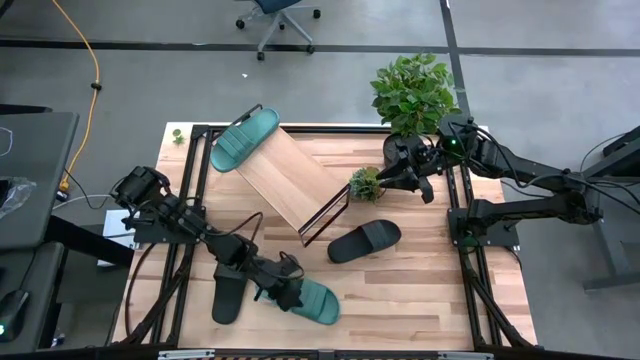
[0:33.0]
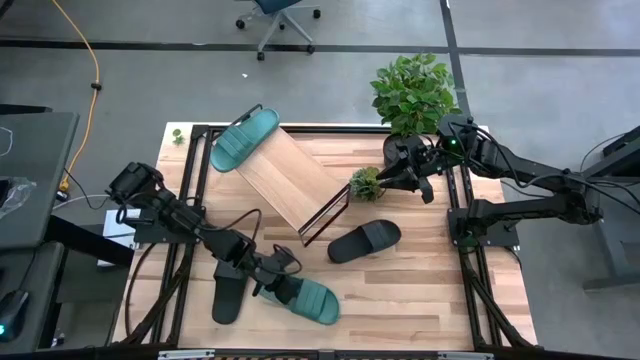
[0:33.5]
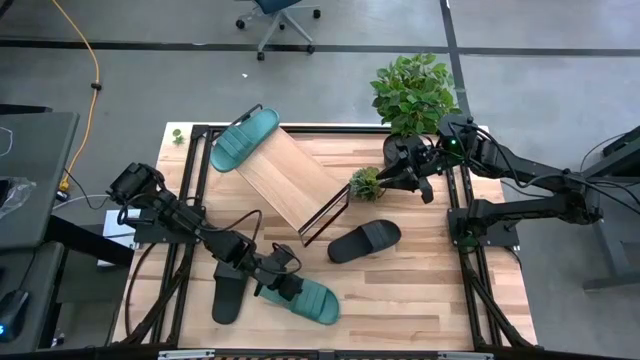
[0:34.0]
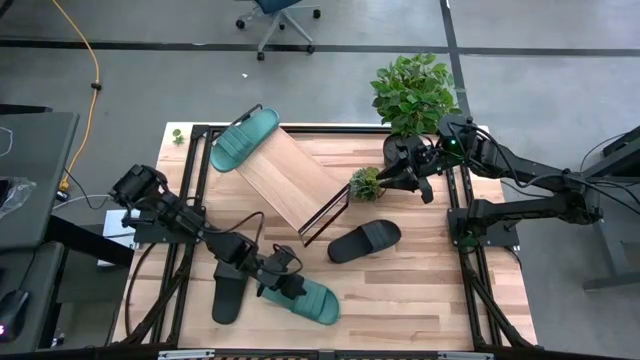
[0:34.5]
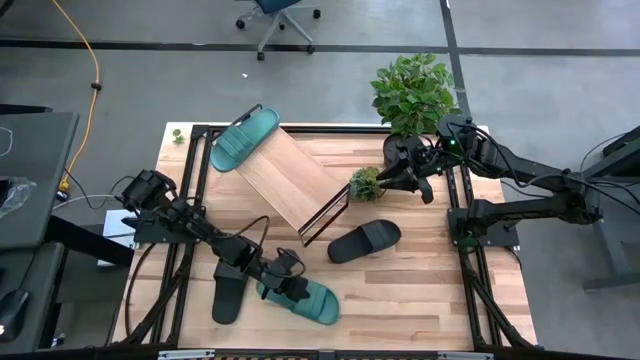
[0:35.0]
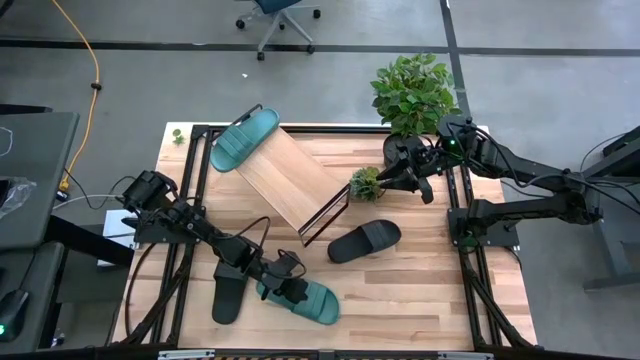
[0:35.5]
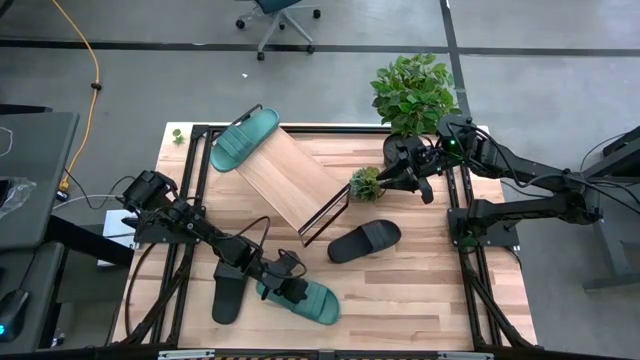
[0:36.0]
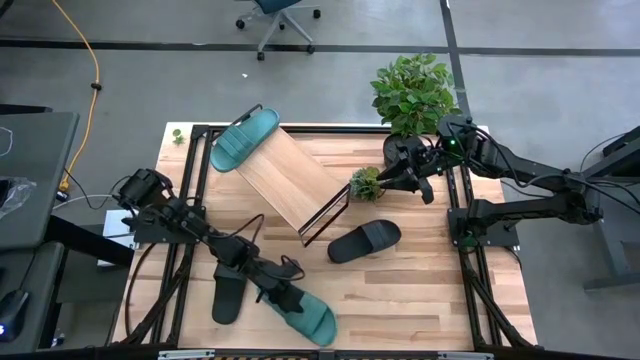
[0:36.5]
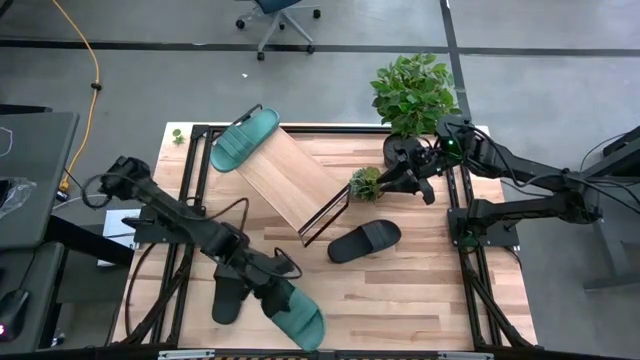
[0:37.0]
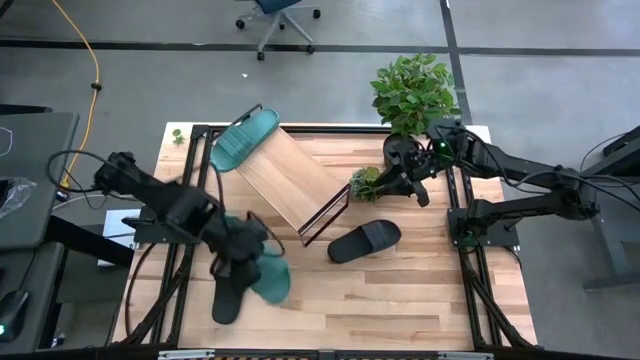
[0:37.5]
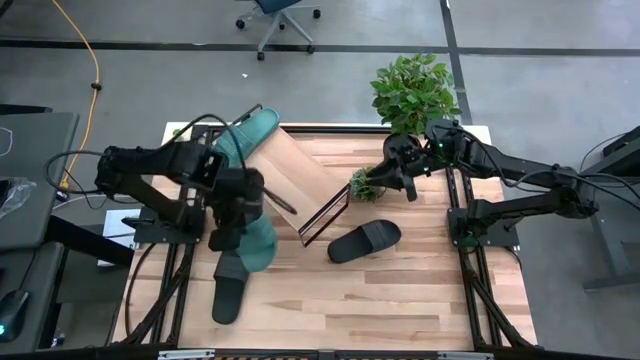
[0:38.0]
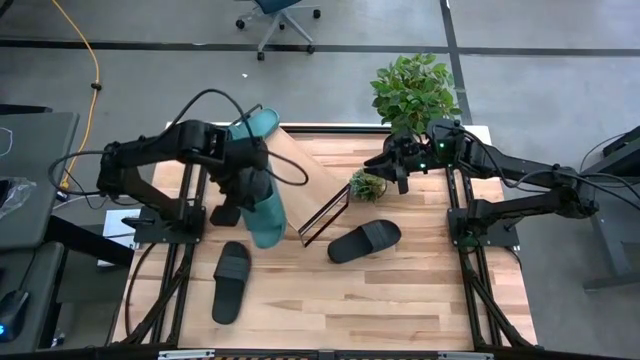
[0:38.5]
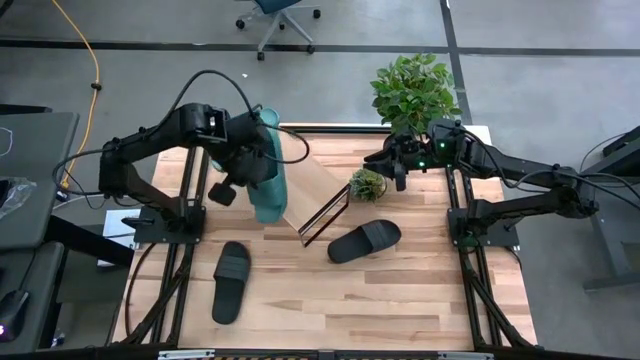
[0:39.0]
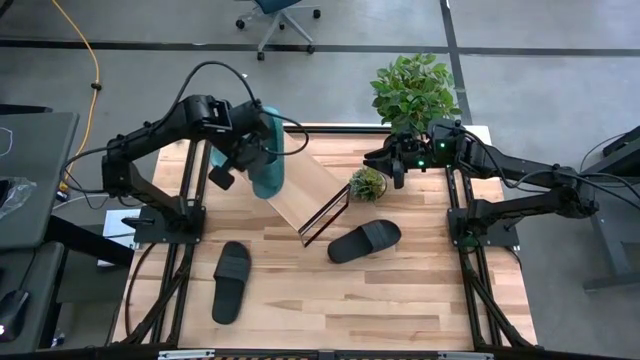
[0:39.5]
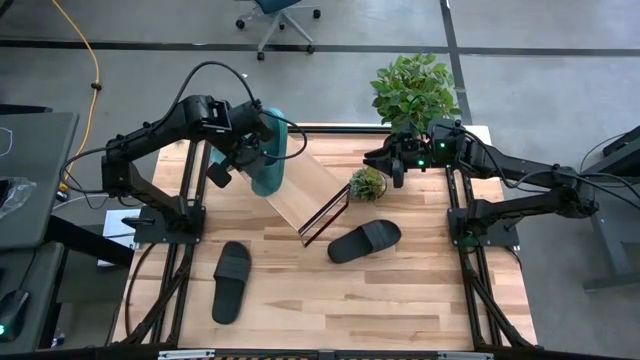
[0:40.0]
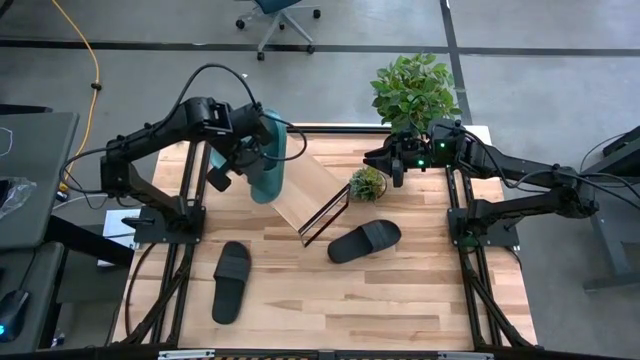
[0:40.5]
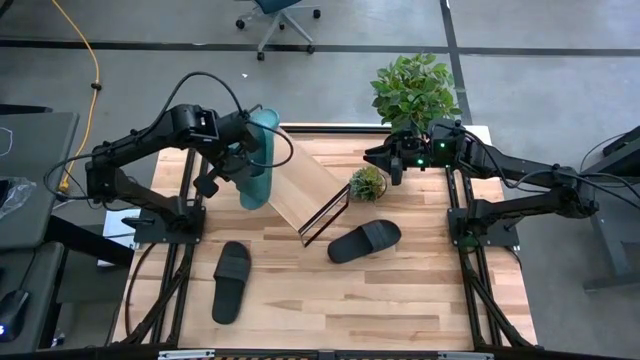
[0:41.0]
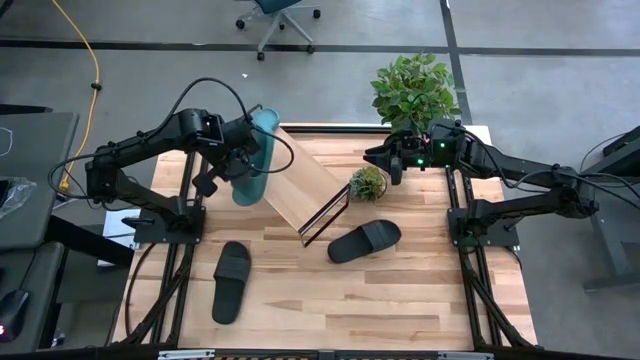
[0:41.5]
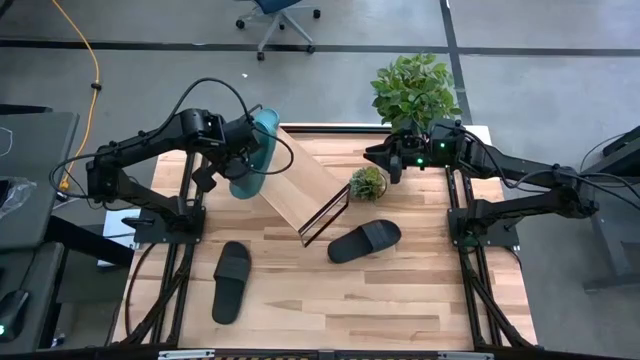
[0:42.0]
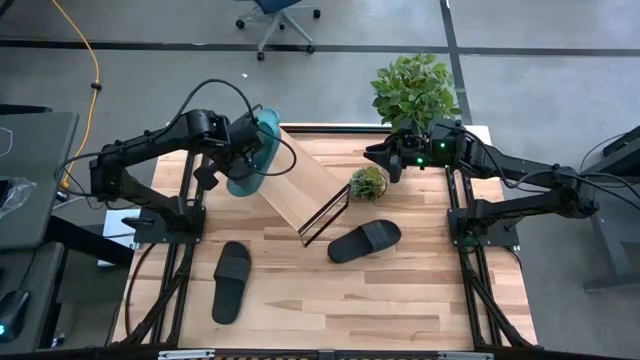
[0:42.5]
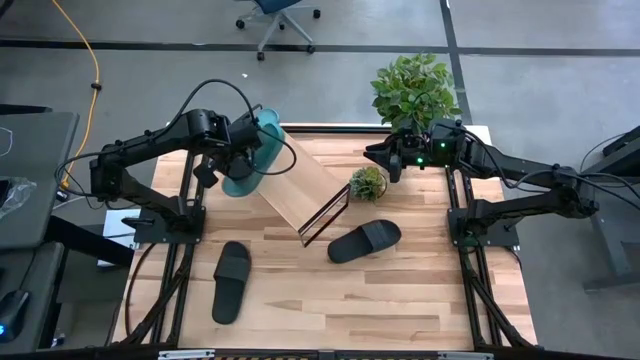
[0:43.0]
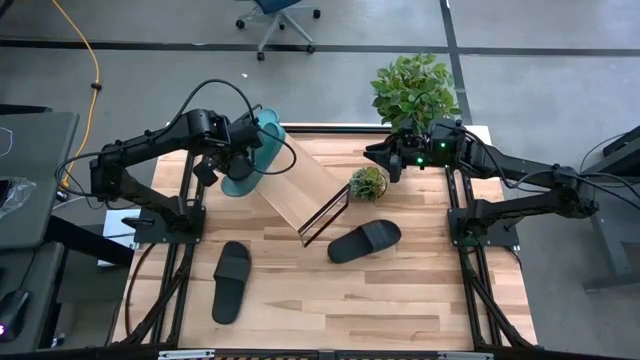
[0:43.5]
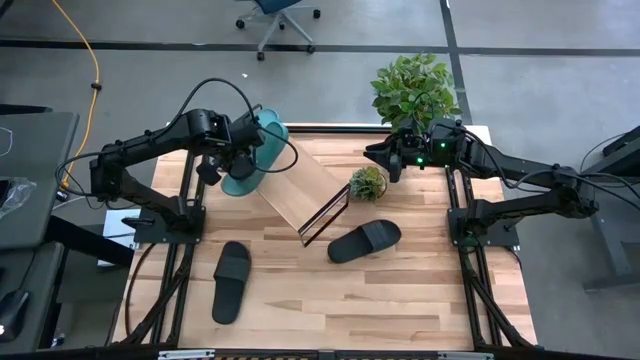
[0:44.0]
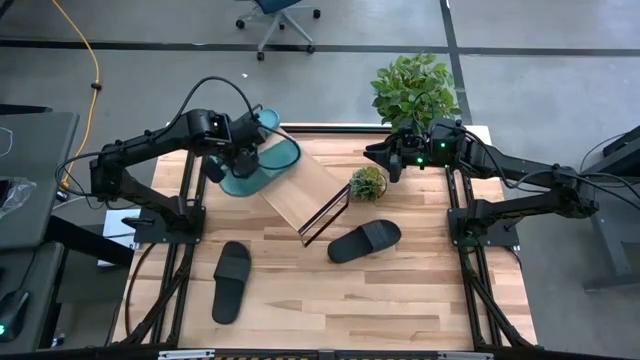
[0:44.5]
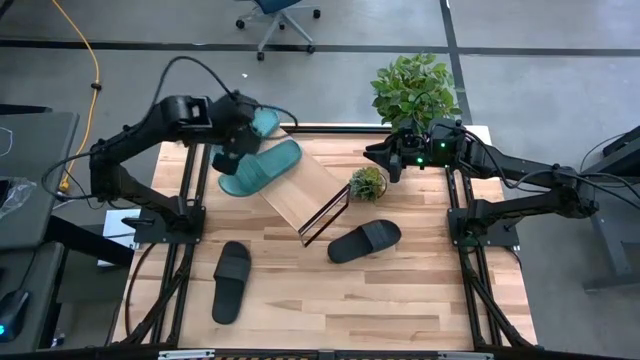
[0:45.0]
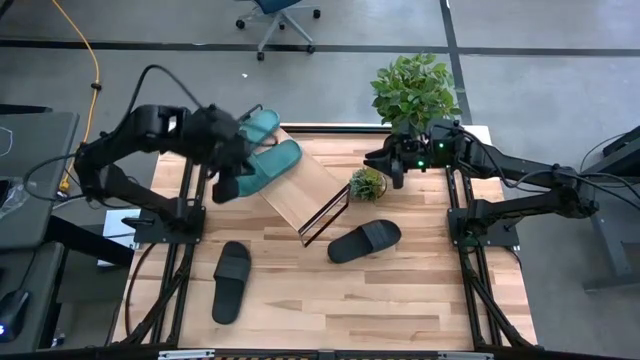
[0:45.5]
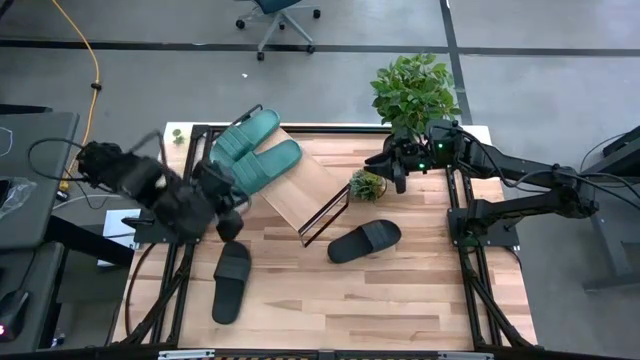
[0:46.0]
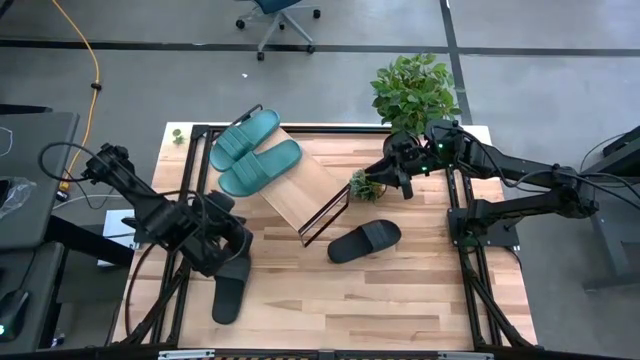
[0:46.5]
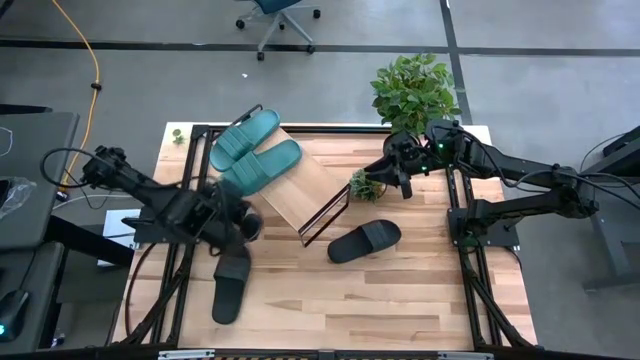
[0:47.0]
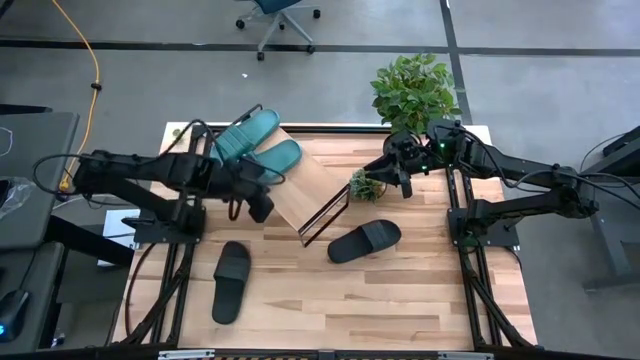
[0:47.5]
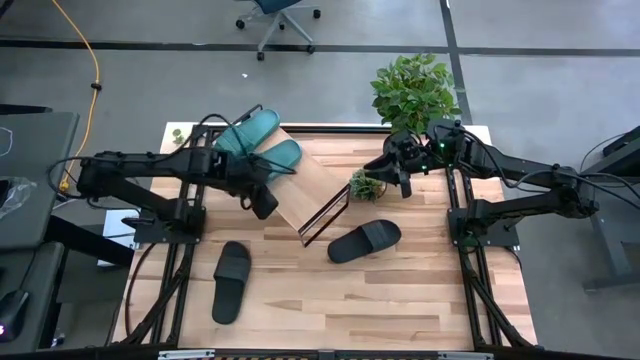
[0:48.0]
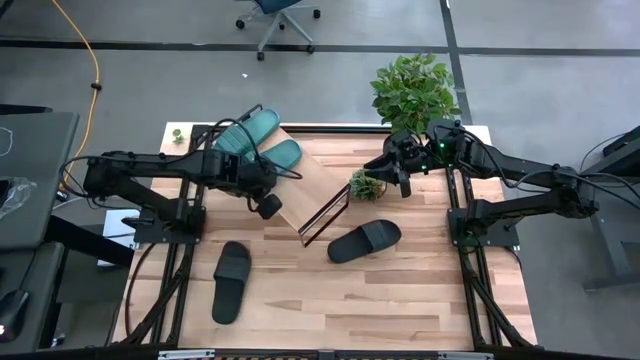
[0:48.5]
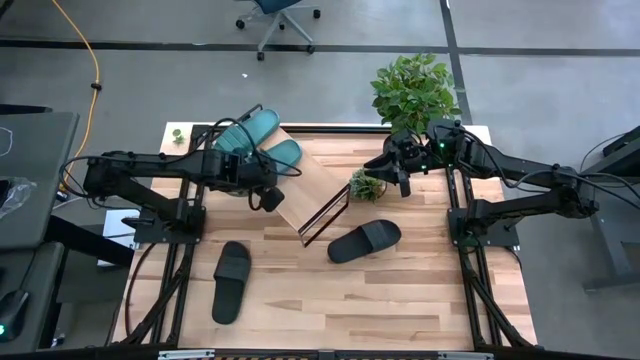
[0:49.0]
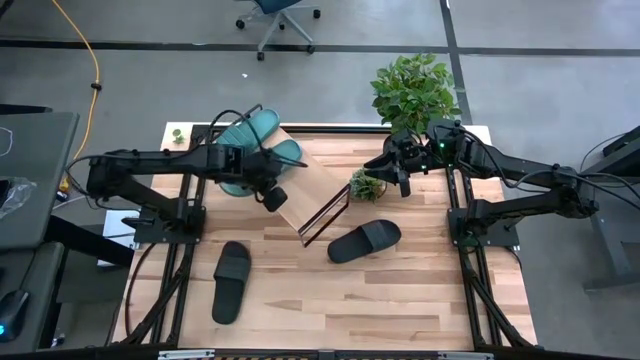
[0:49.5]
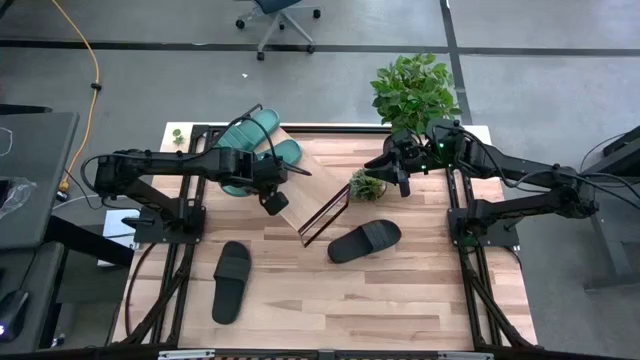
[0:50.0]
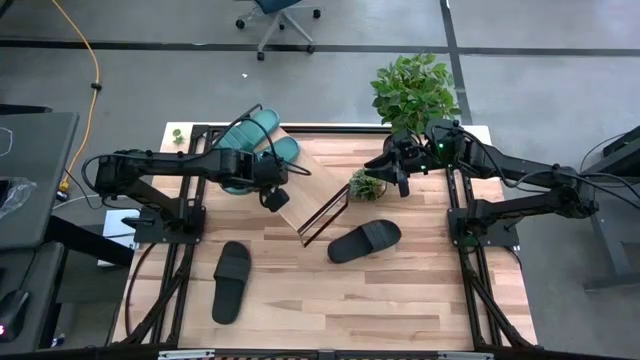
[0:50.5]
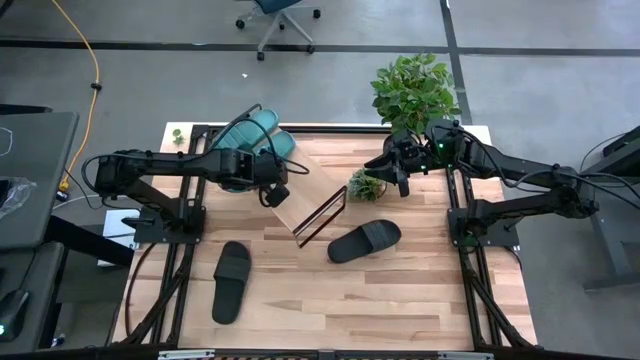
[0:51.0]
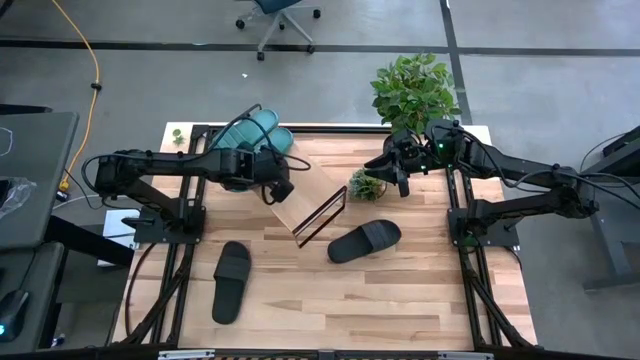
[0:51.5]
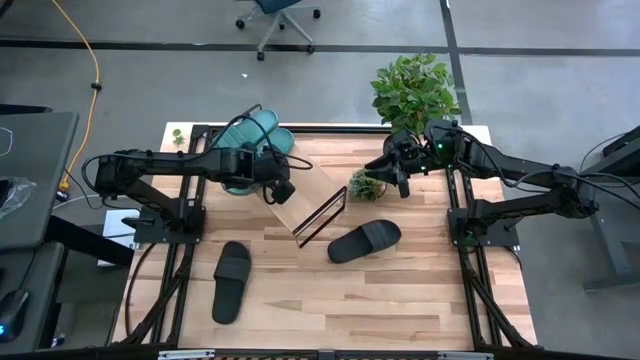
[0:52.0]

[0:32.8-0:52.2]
Task: Pick and place slippers onto the shelf
Put the green pair of slippers on the shelf

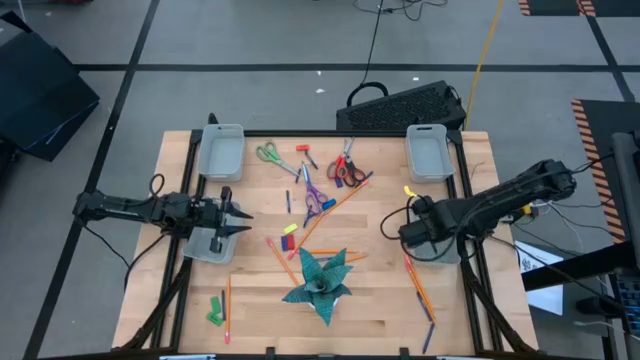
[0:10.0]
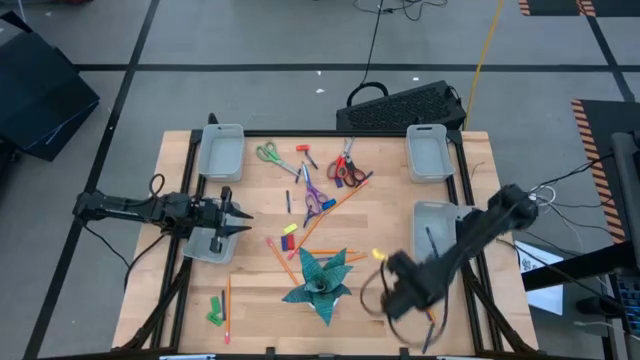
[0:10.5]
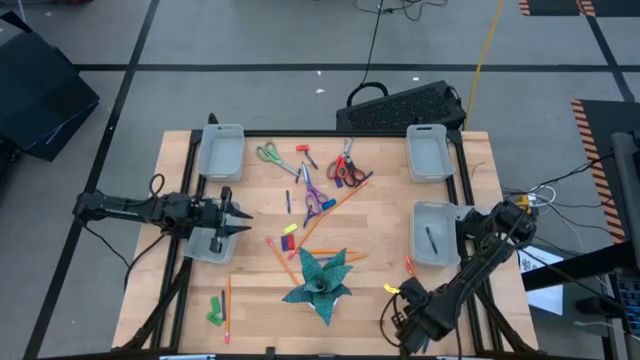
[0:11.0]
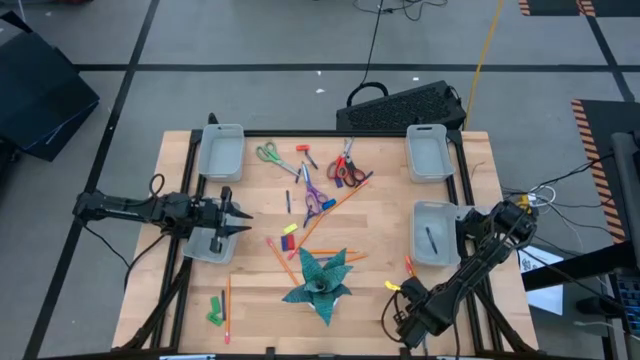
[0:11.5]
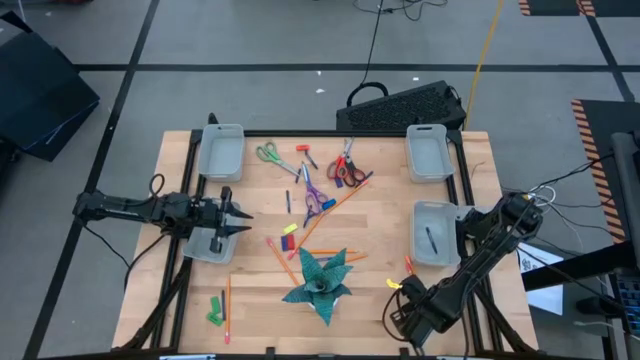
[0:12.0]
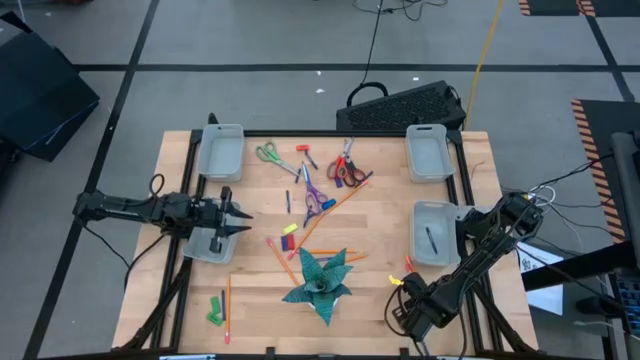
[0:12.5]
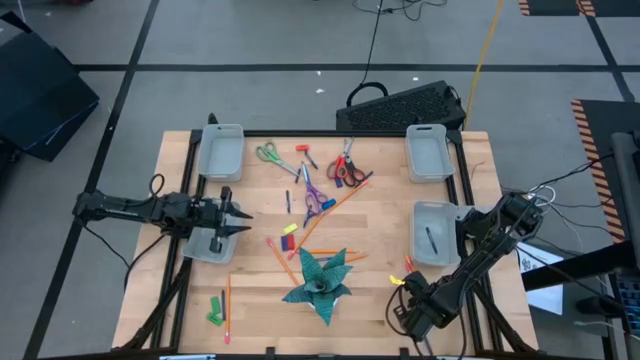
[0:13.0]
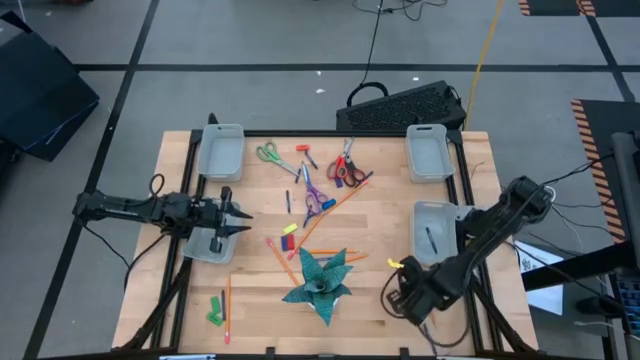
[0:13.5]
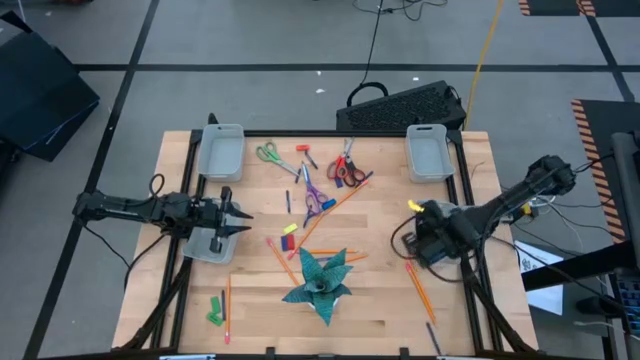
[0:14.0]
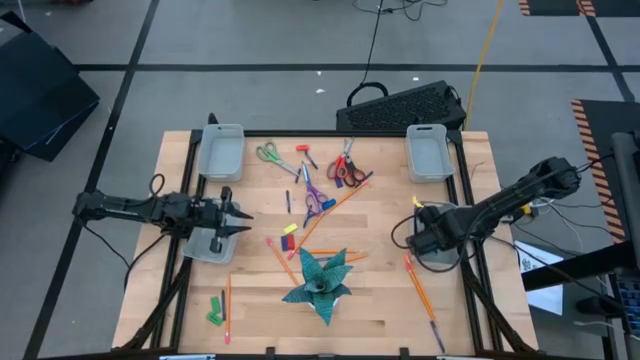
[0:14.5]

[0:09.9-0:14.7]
Task: Sort crayons/erasers/pens/pencils in bins
Put the blue crayon into the bottom right gray bin
